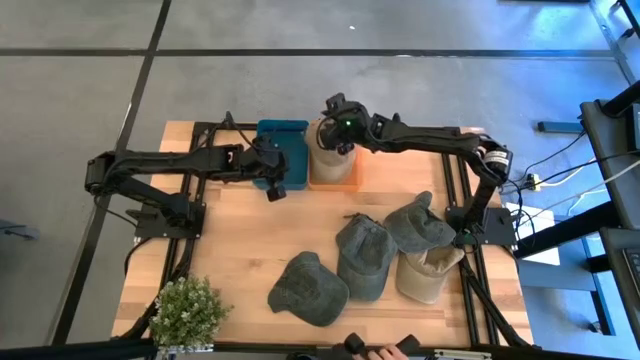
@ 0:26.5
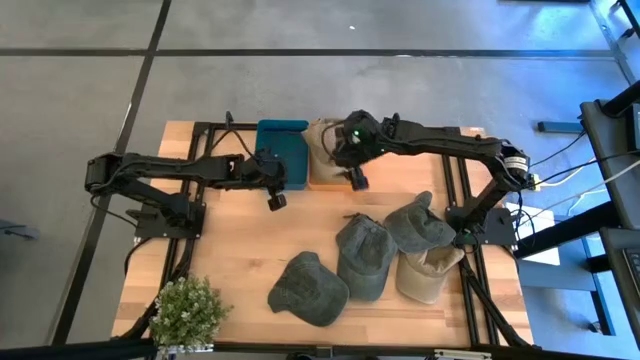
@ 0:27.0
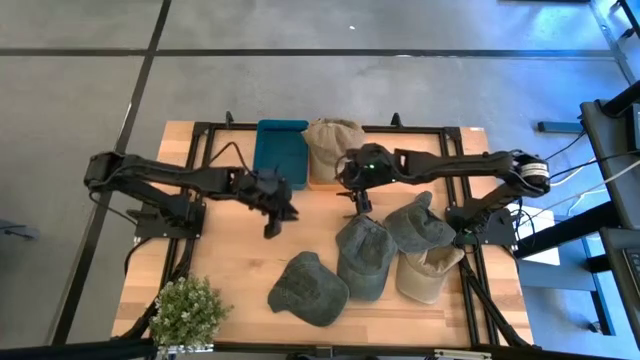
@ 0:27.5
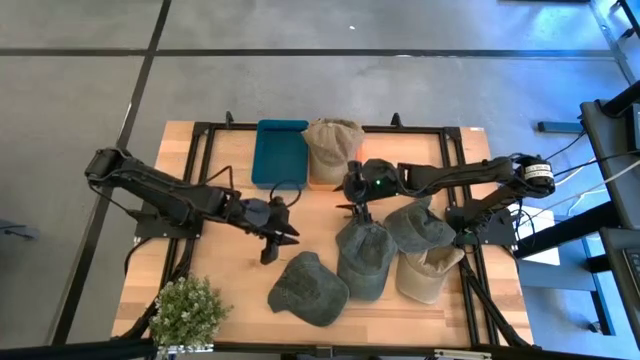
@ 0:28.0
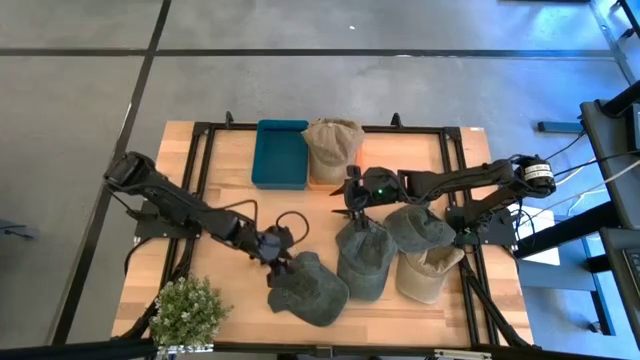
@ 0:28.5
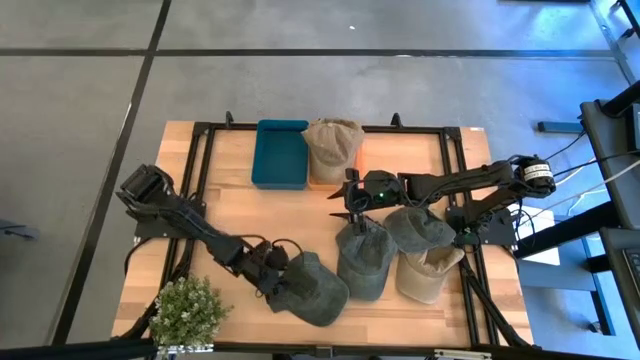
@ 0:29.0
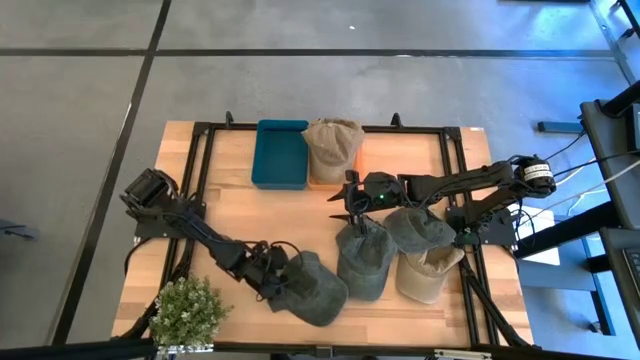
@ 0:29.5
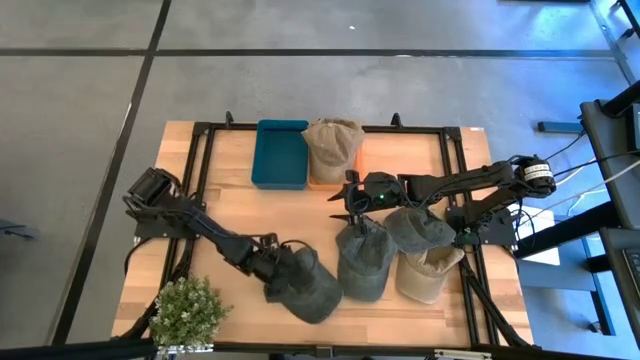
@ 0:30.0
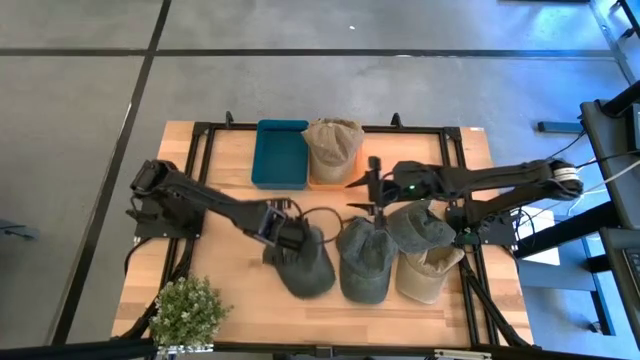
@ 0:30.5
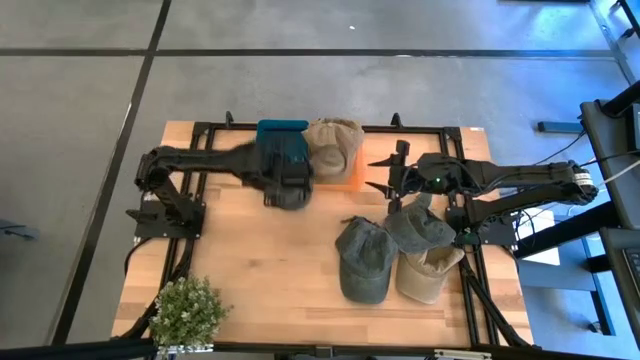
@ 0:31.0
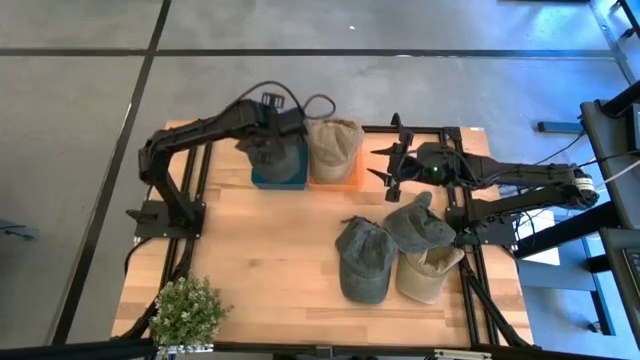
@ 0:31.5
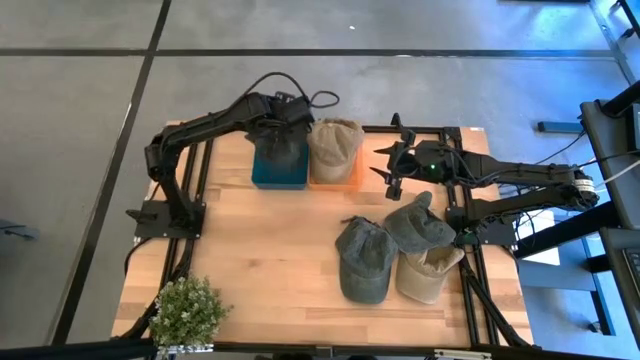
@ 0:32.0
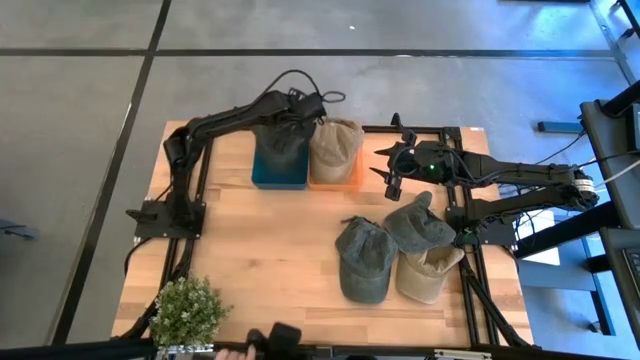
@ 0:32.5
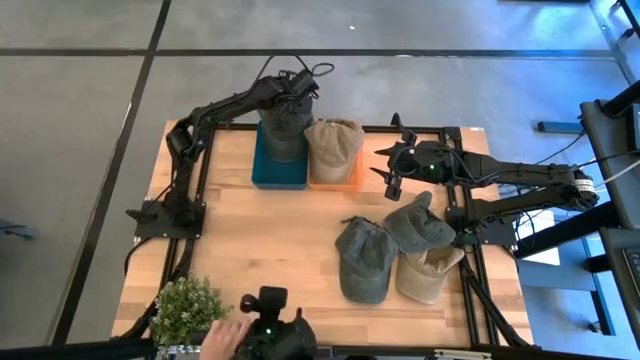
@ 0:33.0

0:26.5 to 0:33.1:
Task: Pick & Place hat
Put the left gray cap into the blue bin

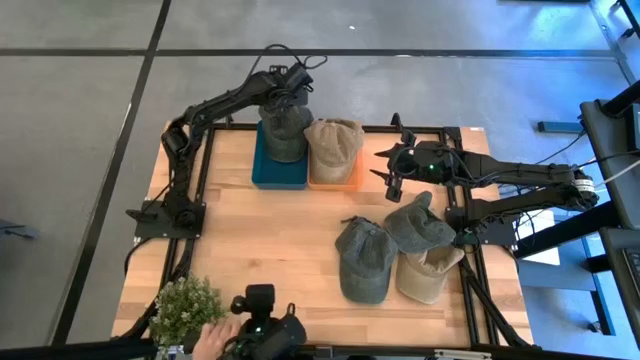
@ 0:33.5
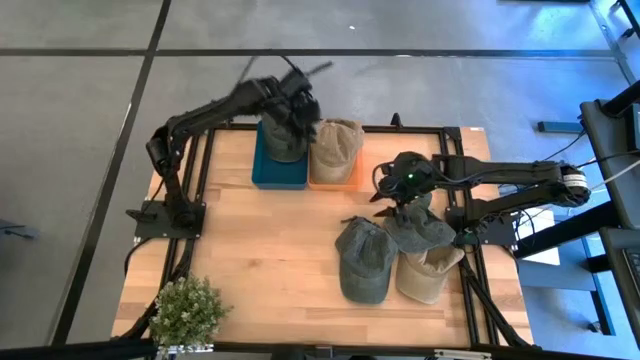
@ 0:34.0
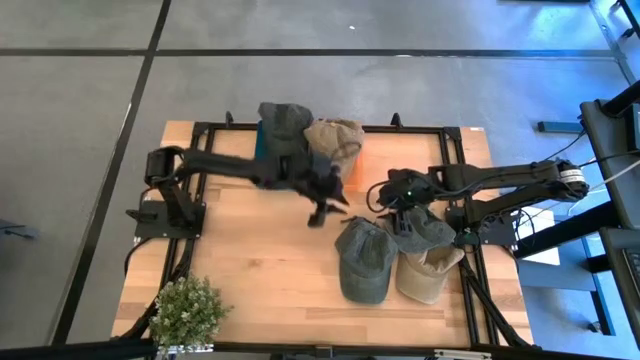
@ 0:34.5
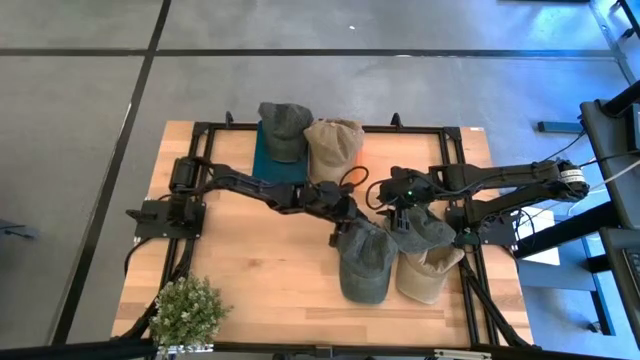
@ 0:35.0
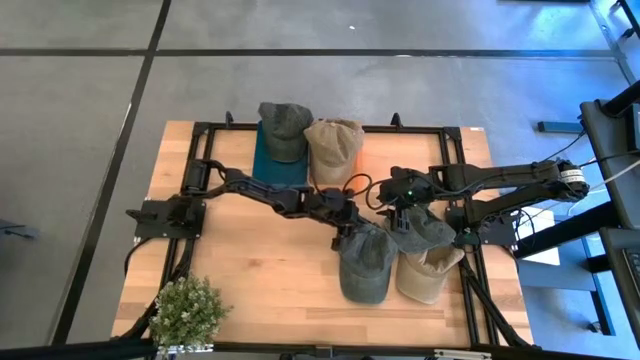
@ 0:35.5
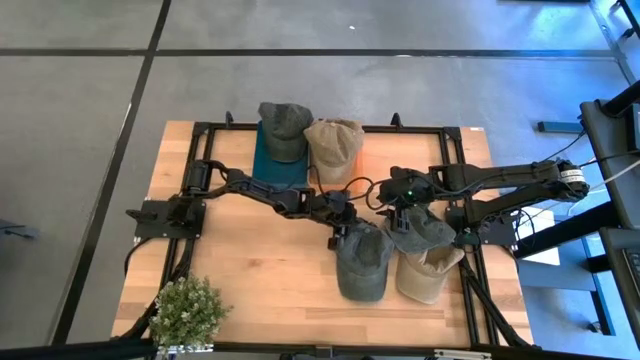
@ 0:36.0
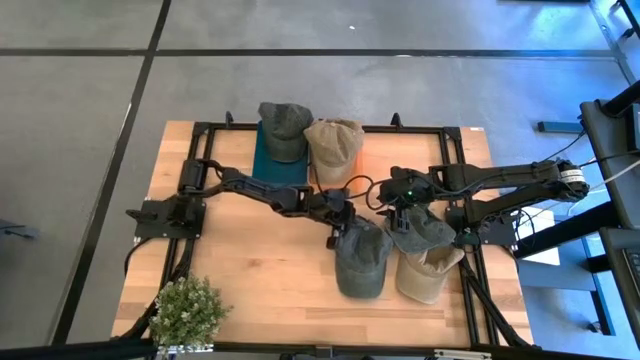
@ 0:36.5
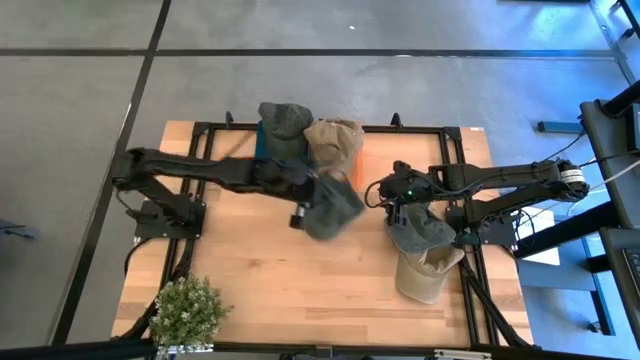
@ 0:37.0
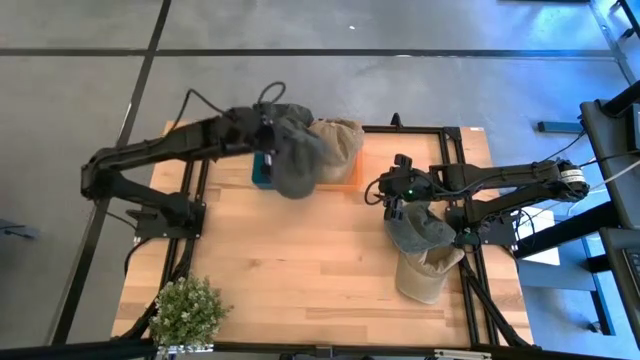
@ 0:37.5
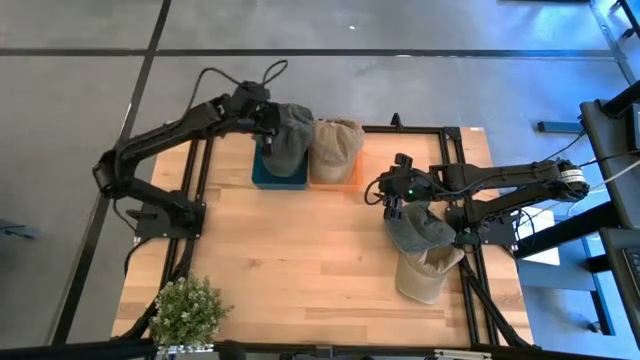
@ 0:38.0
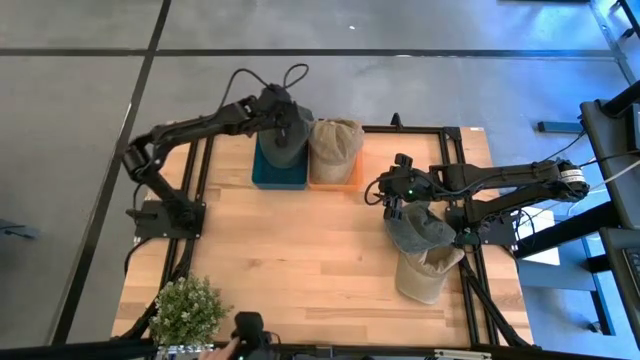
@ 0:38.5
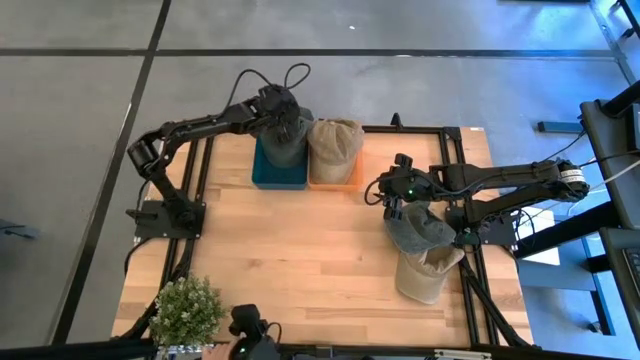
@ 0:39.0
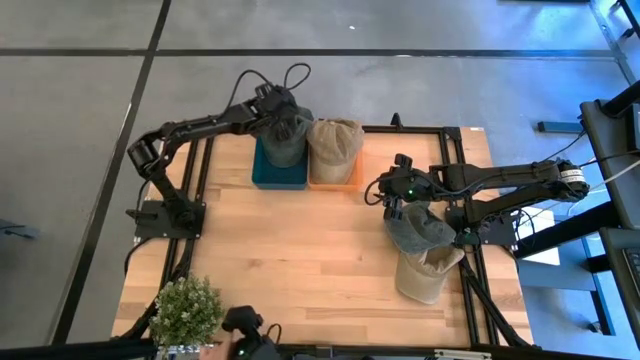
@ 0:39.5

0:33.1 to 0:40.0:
Put the left gray cap into the blue bin

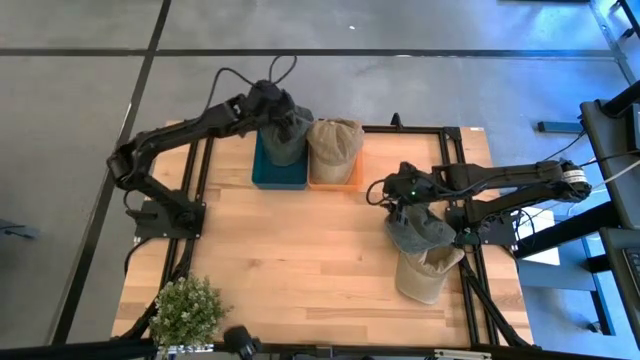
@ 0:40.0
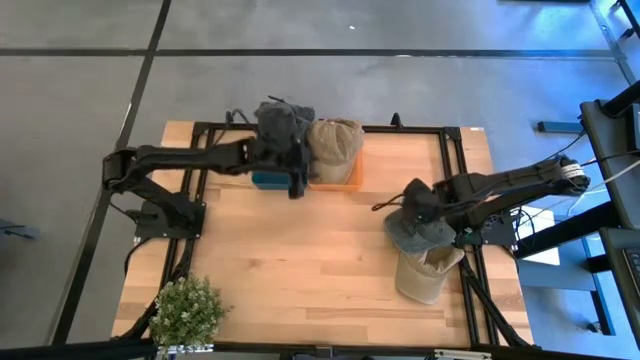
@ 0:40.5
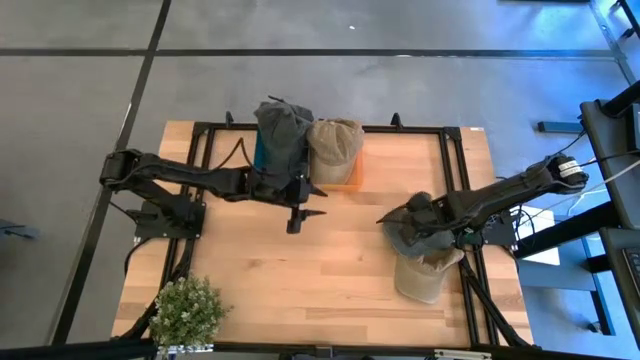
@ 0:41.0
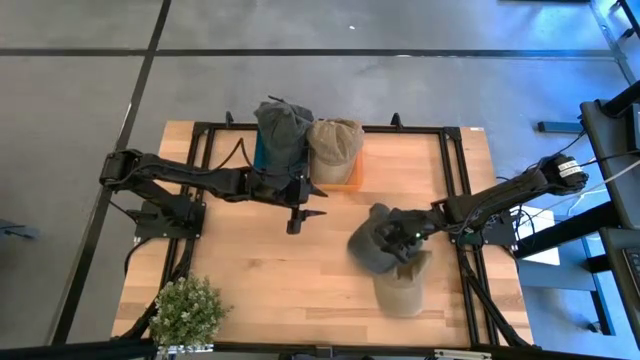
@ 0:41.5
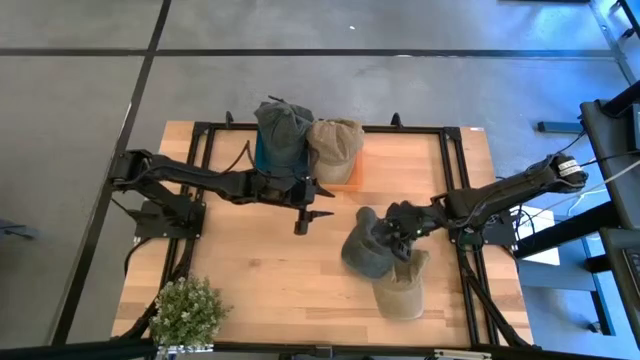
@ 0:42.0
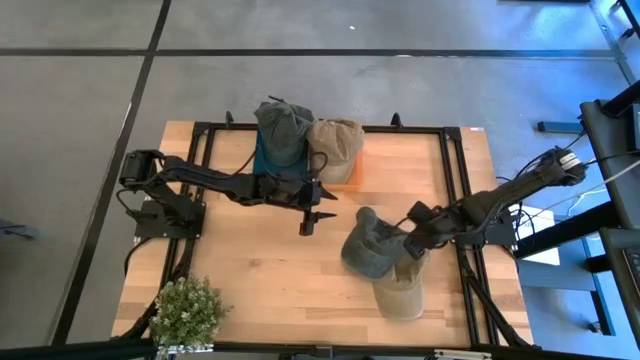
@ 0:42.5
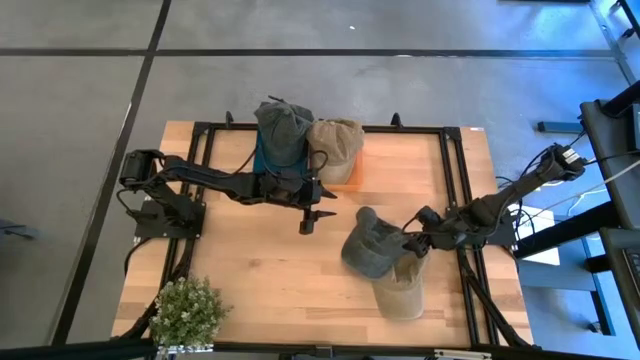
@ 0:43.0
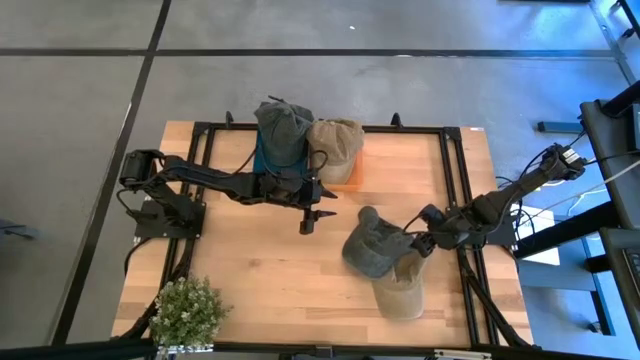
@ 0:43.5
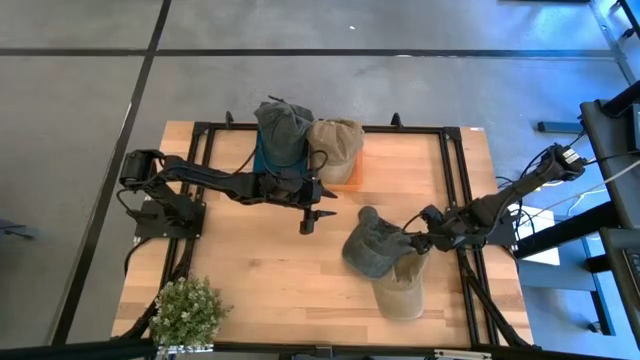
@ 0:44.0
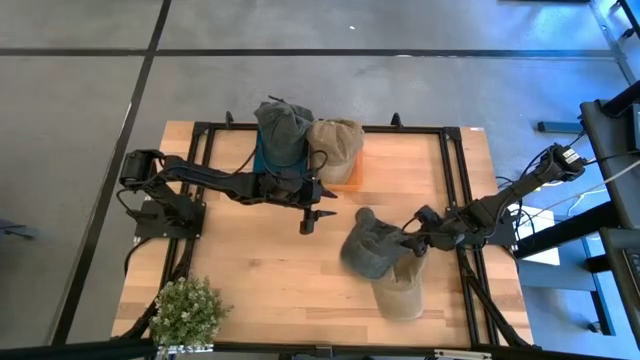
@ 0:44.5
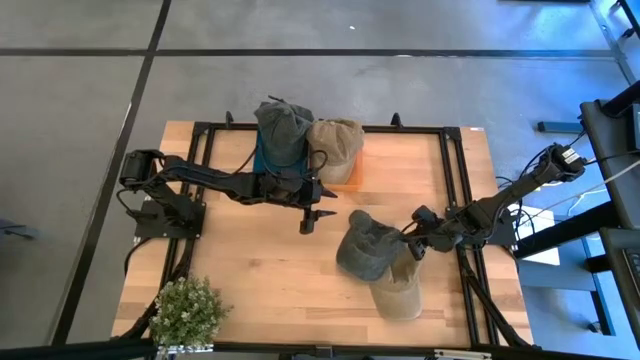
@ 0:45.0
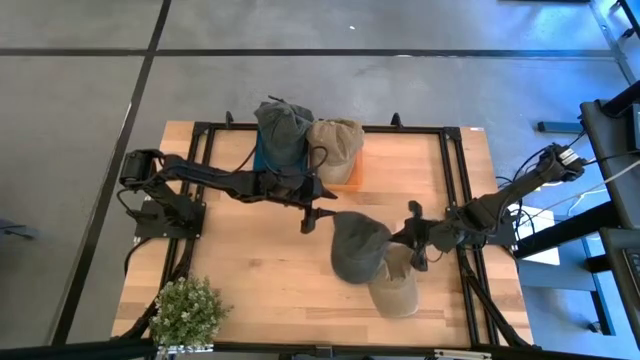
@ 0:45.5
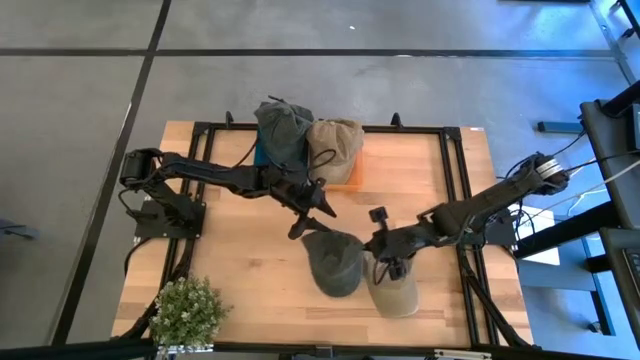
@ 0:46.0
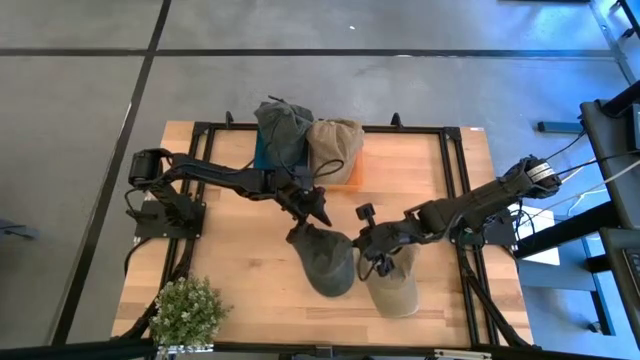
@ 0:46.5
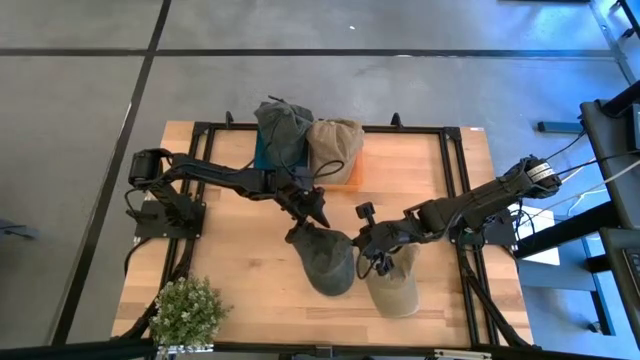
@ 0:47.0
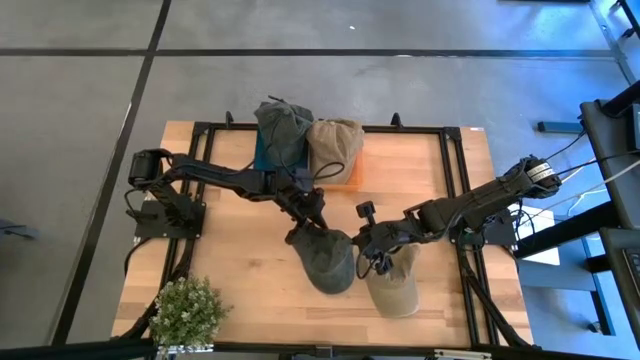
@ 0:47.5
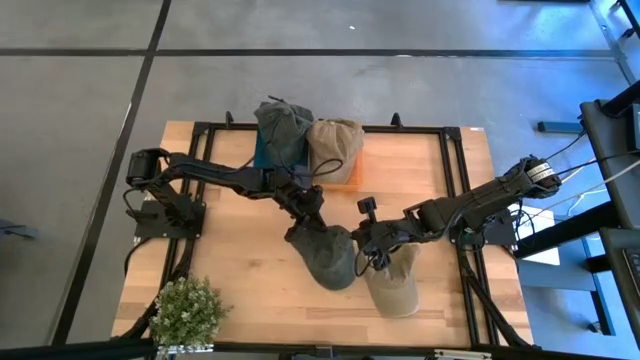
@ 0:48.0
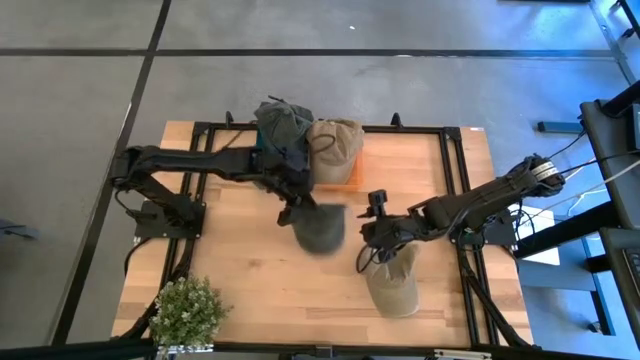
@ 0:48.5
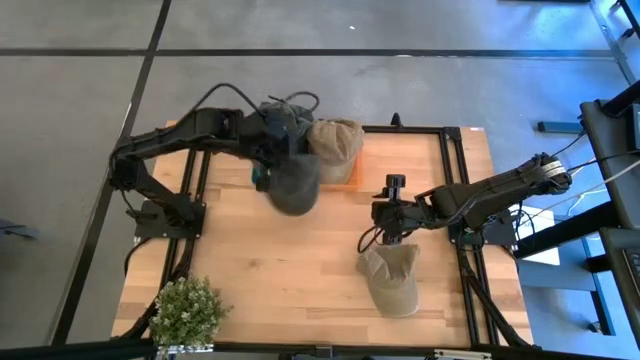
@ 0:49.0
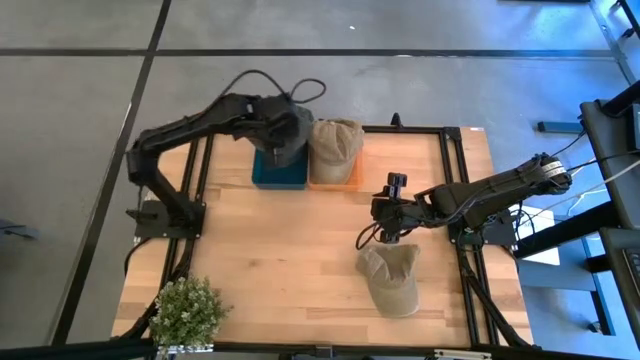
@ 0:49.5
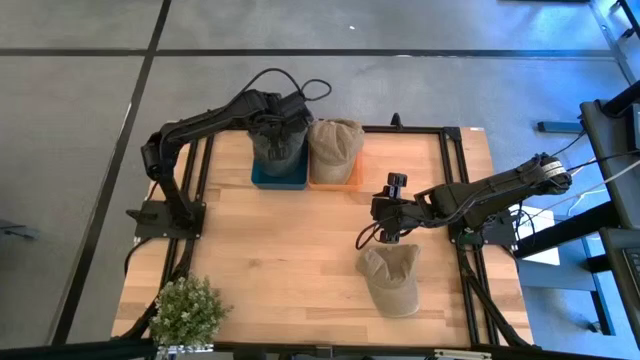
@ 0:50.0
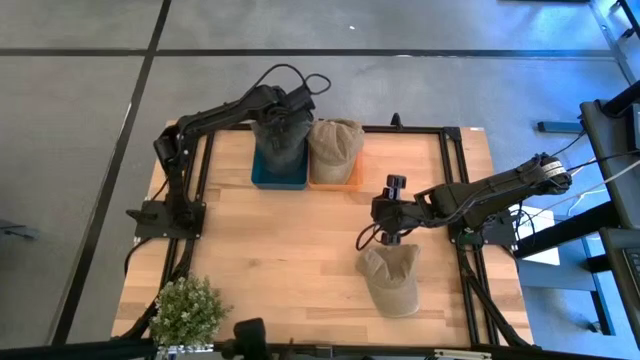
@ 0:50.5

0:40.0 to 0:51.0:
Put the gray cap into the blue bin
